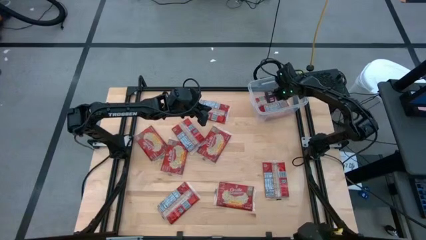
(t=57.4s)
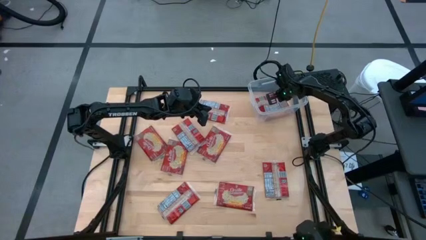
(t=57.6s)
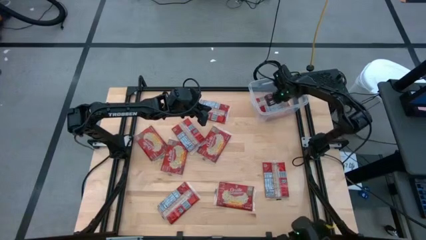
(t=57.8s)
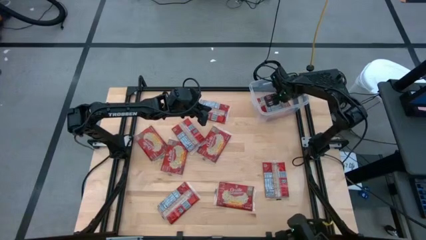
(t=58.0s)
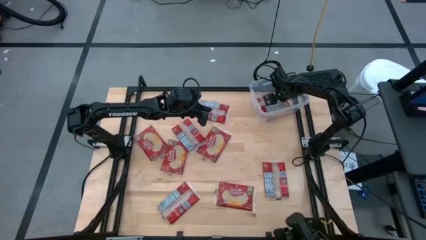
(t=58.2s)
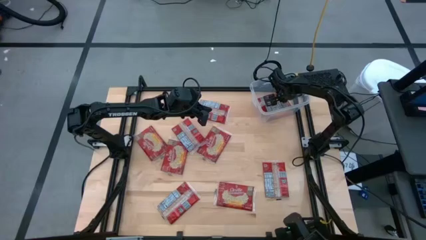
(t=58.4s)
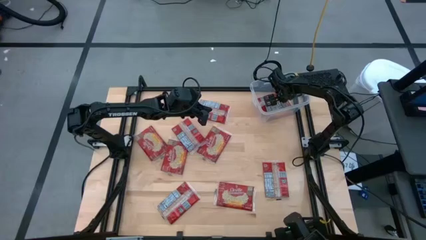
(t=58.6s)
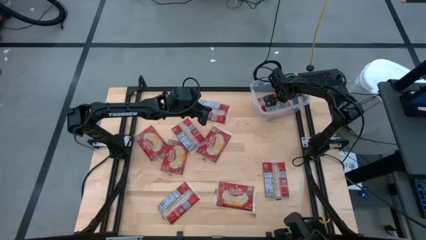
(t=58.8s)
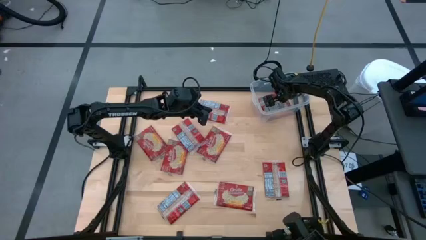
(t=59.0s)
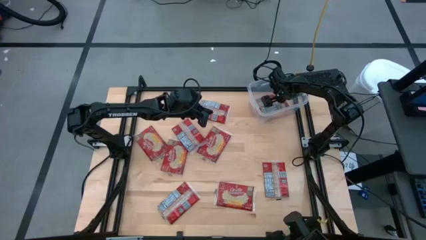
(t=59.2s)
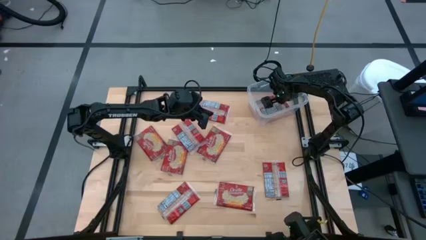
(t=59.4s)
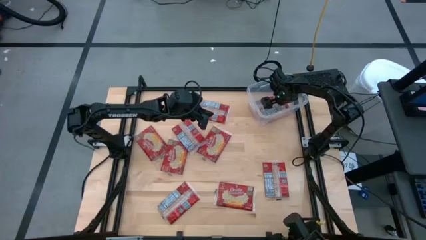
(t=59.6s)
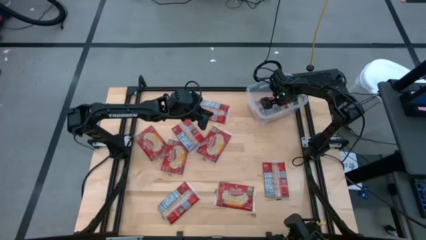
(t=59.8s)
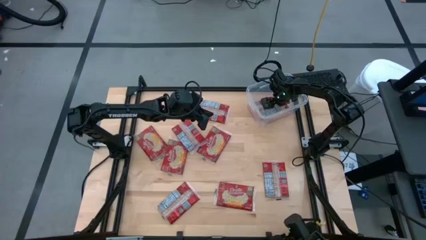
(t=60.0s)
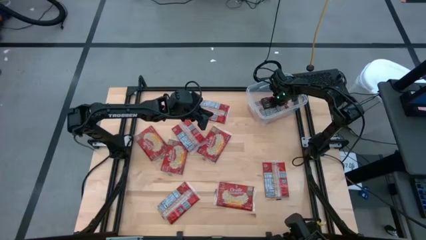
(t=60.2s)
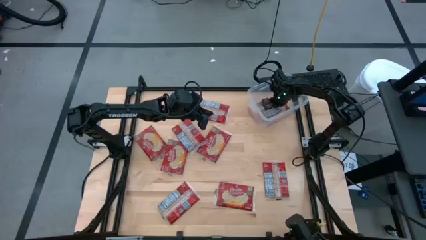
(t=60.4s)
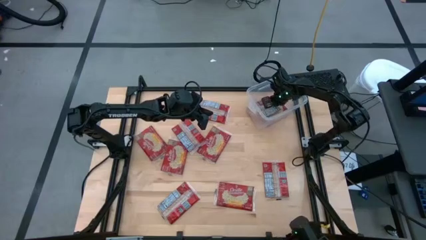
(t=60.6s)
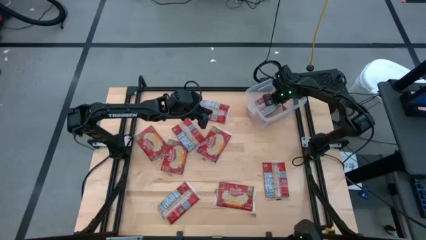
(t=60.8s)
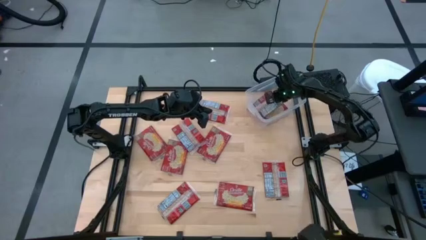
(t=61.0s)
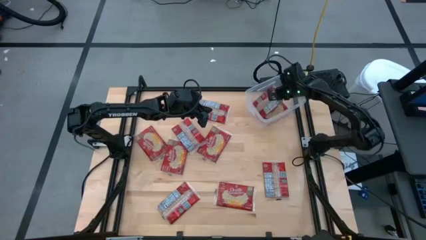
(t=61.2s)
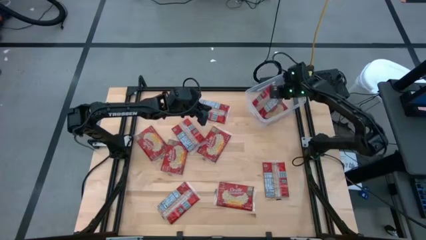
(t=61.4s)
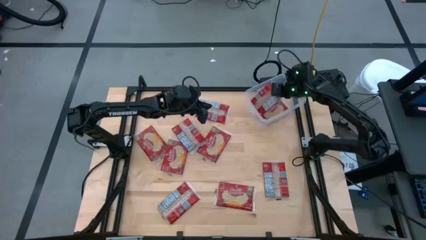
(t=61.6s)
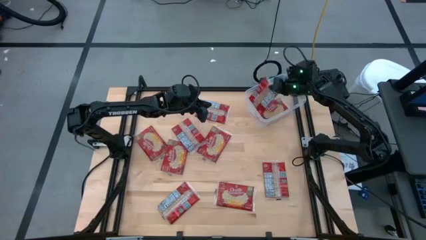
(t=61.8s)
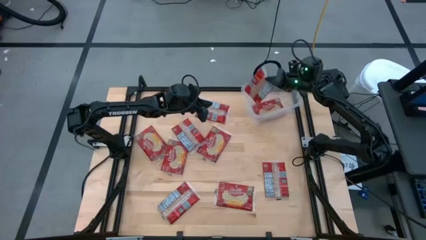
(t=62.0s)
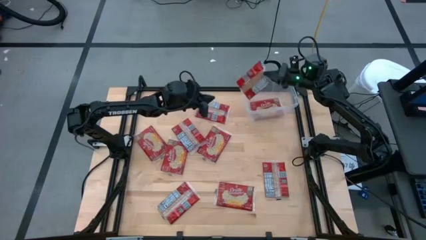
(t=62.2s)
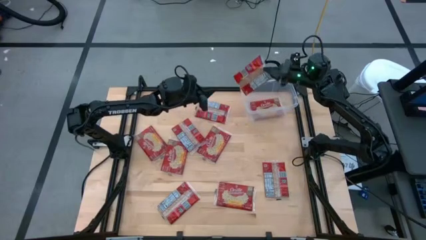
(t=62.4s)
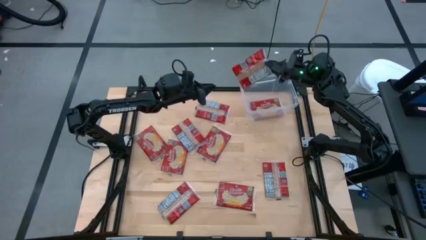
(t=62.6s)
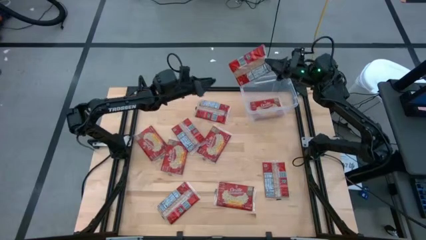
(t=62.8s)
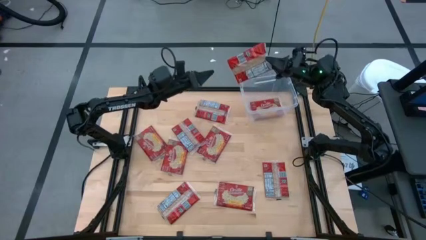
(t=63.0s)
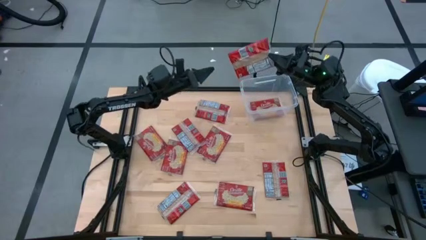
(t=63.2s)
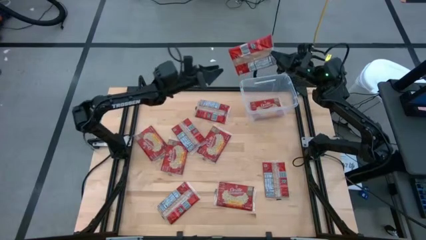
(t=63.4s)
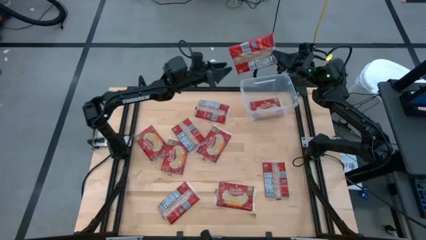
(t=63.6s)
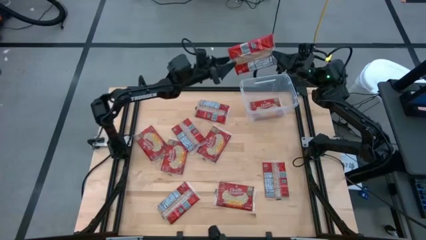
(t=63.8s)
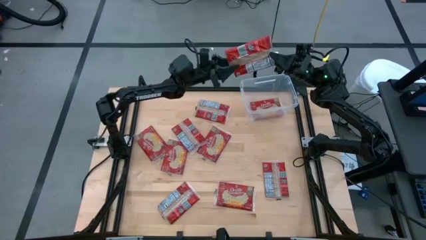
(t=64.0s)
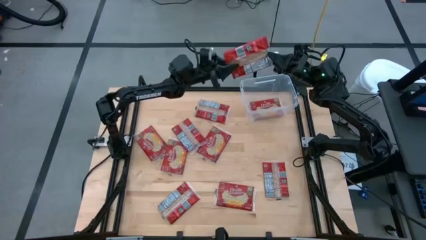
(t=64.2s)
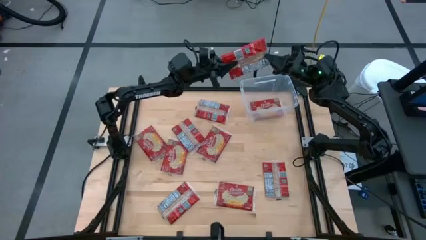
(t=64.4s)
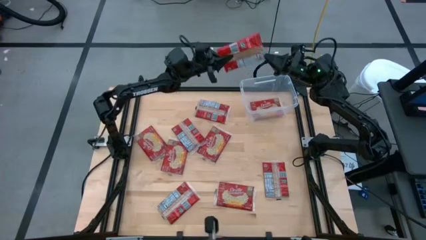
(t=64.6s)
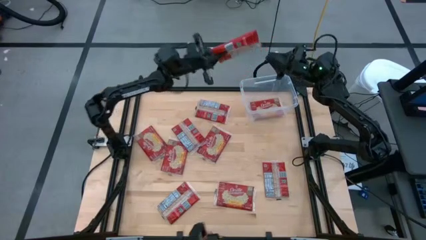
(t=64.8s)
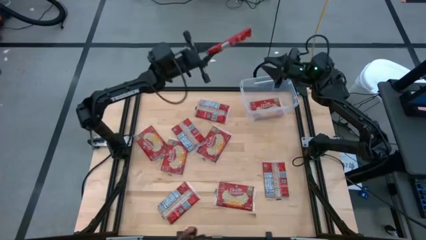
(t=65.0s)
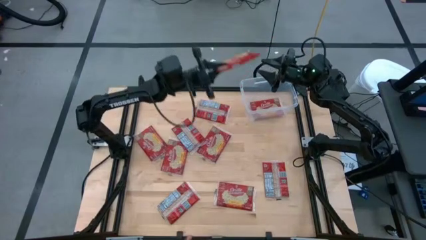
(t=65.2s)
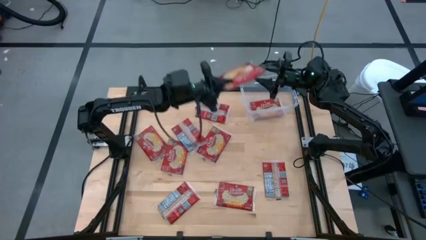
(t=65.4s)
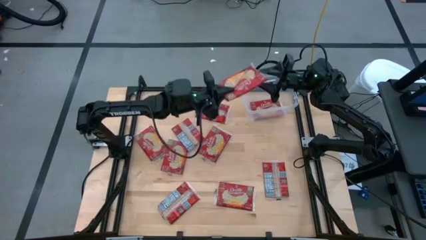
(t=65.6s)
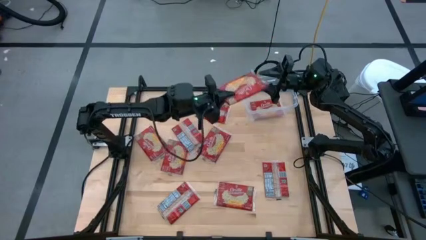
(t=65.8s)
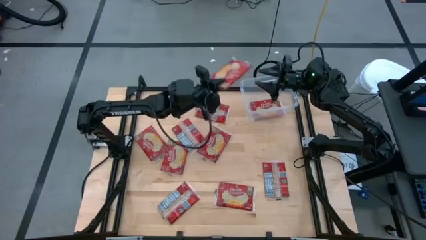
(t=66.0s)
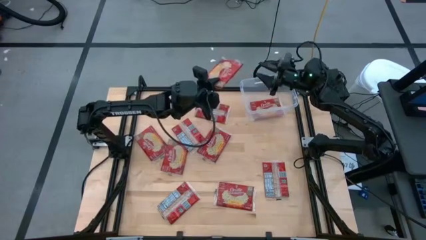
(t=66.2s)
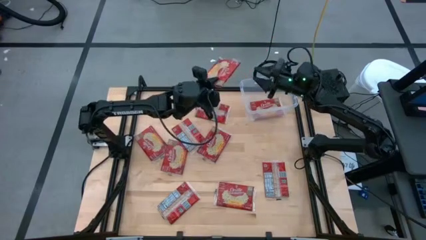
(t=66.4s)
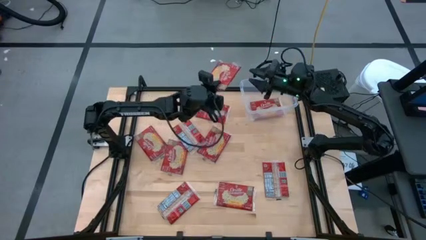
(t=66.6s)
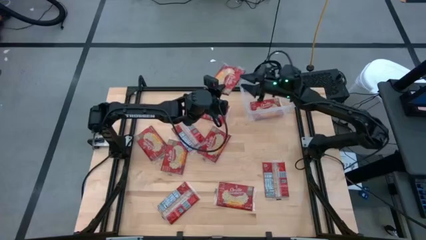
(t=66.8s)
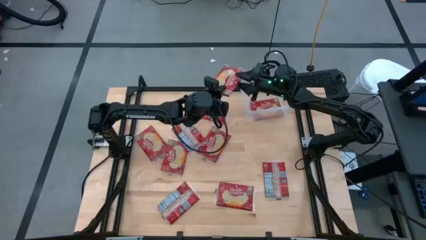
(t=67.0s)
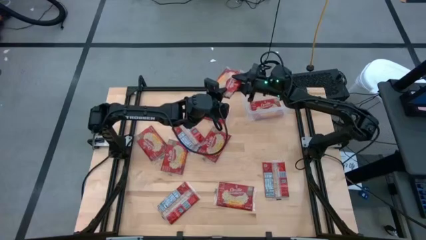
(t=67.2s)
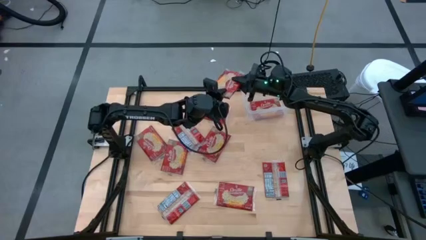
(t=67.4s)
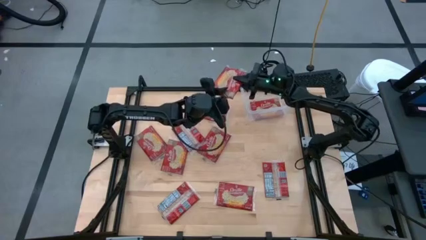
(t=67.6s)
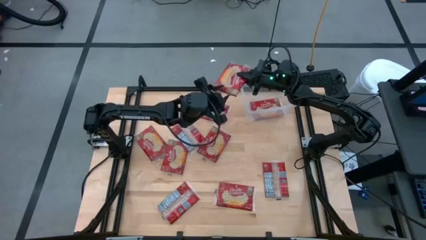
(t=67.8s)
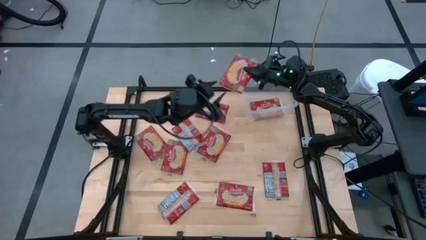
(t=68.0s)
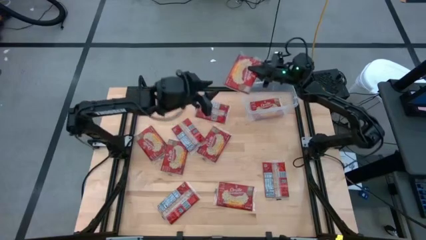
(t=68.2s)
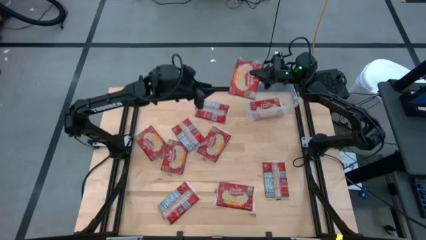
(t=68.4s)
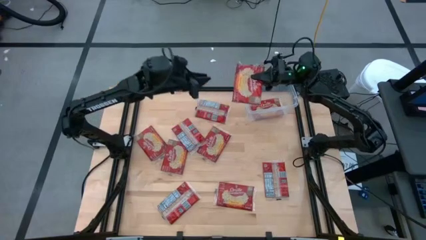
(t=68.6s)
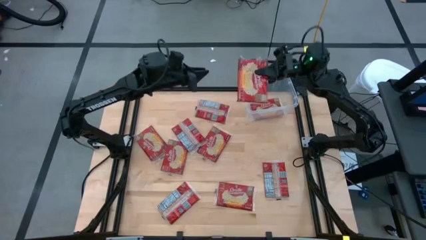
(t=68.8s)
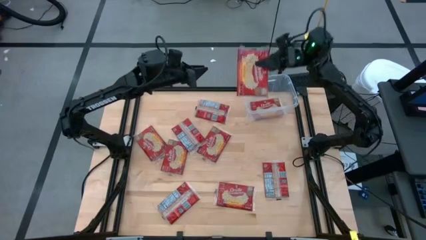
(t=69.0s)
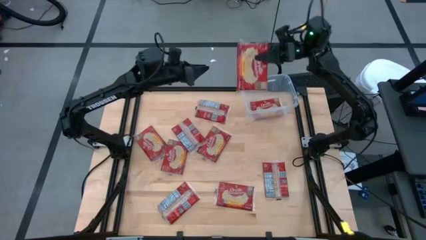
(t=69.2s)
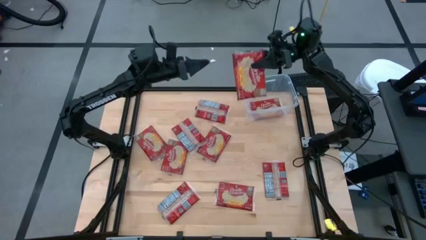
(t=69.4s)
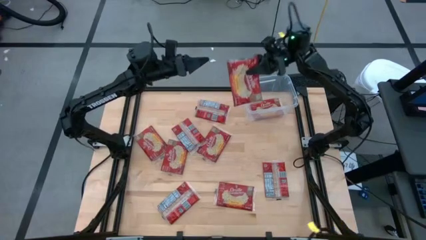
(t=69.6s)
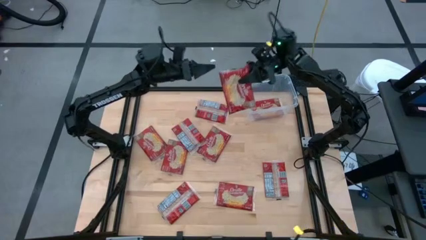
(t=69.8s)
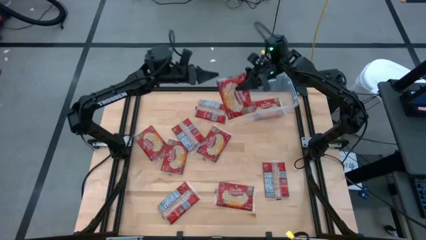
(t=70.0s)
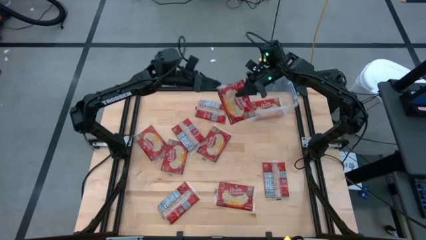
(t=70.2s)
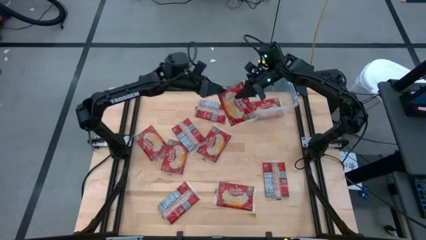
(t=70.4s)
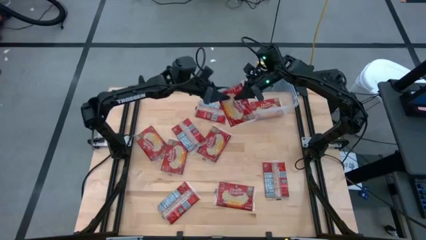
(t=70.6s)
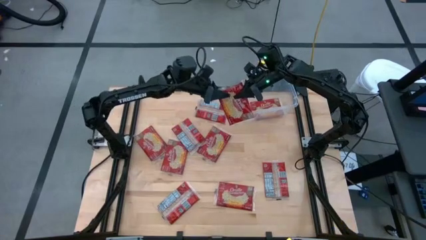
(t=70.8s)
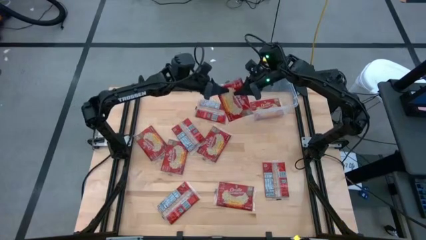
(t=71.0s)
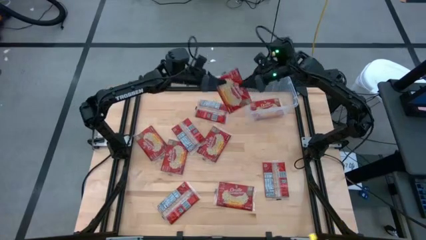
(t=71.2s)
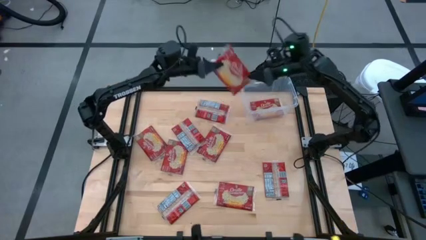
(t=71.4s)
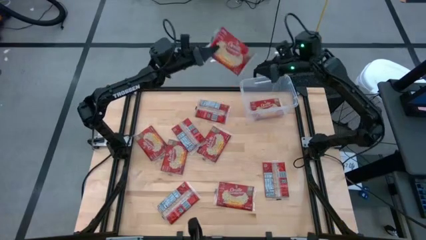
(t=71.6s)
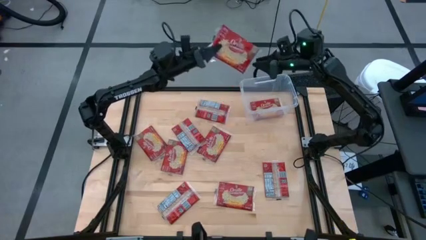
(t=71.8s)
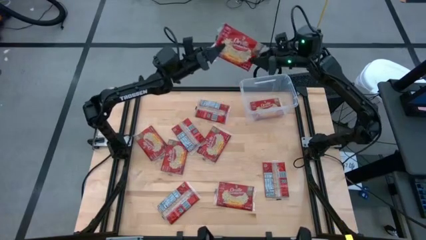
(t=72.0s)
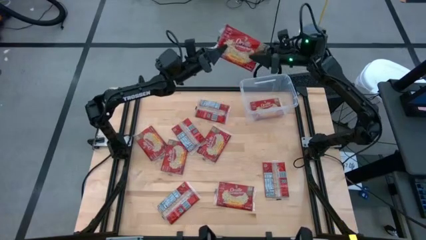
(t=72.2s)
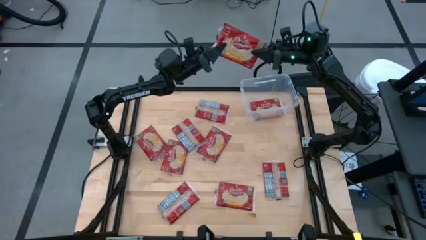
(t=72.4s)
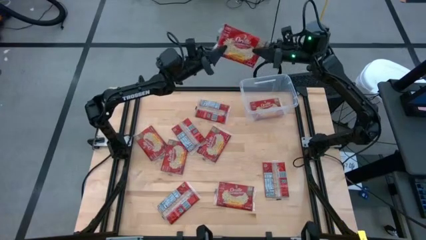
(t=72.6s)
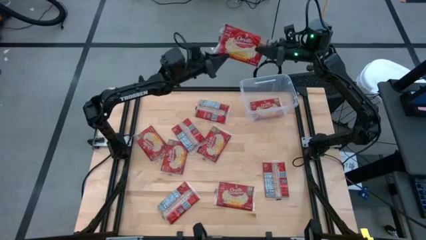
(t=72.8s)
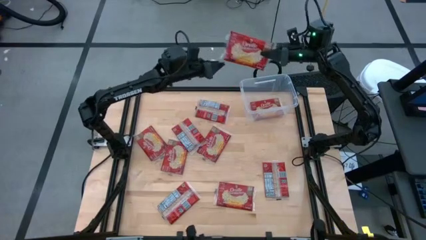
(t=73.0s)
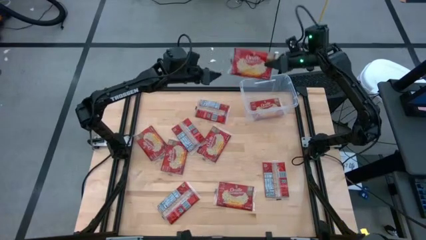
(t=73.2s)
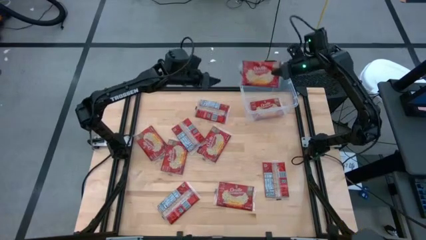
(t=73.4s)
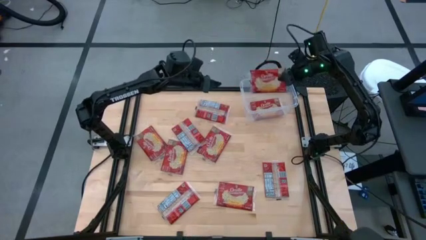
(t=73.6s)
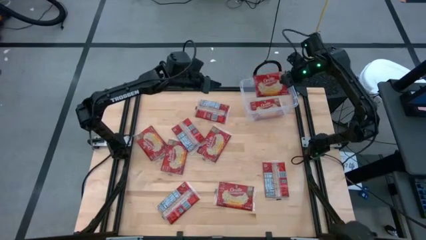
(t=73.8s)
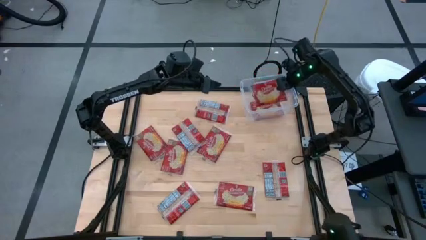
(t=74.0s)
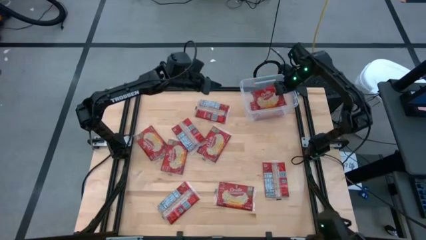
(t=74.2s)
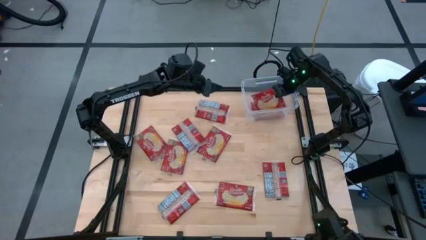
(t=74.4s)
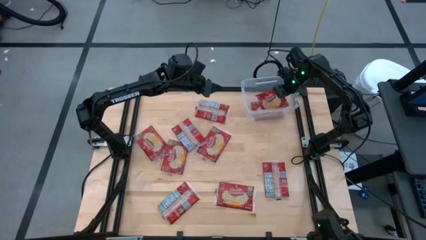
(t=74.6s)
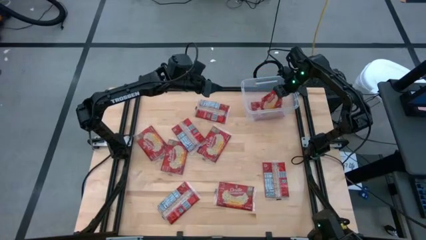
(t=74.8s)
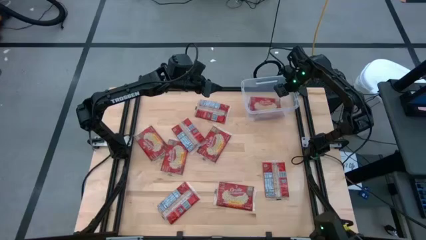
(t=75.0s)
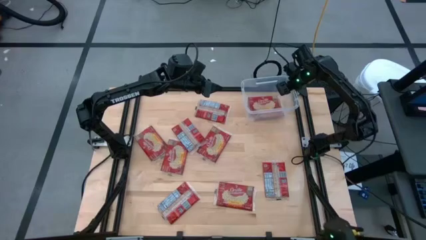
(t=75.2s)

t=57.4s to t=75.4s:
Task: Sort popcorn bags into baskets
Adjust the popcorn bag in the transparent container
